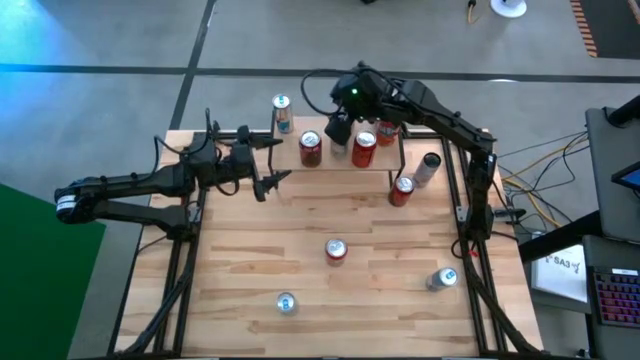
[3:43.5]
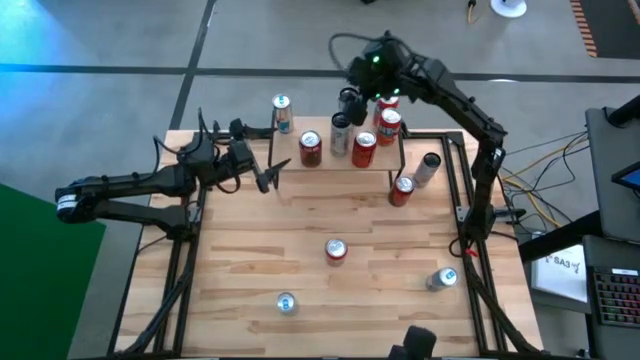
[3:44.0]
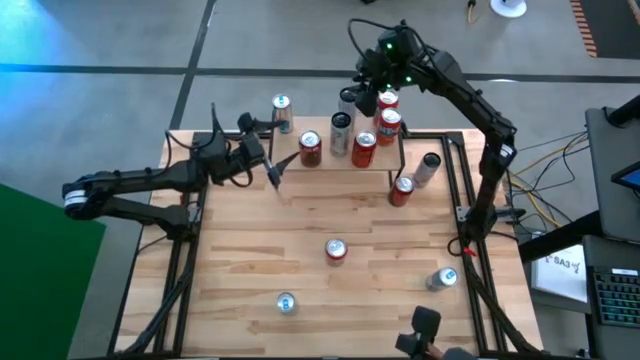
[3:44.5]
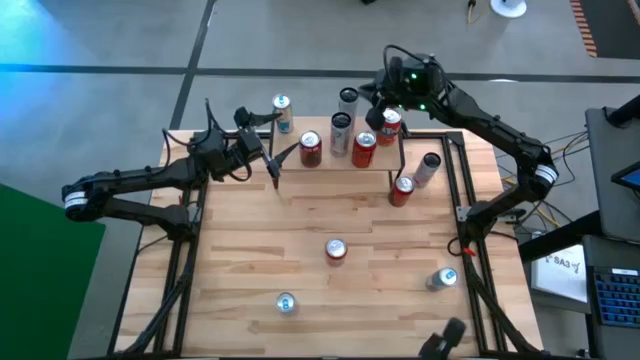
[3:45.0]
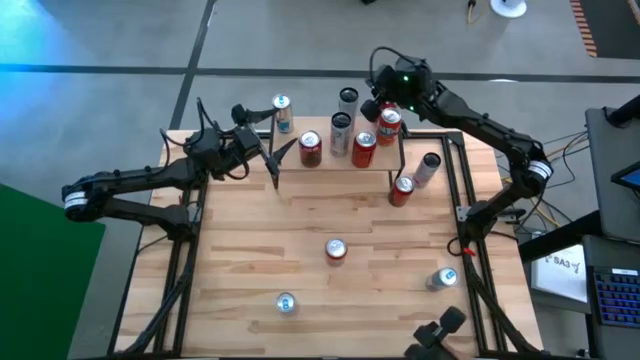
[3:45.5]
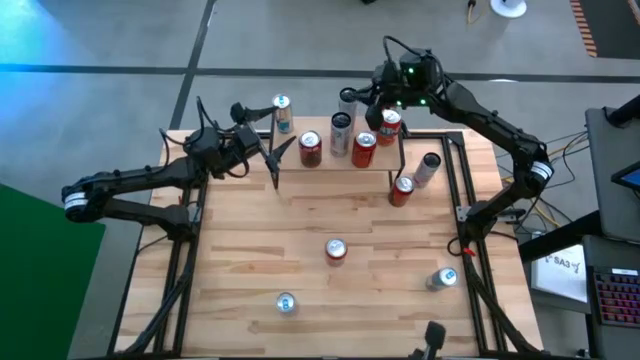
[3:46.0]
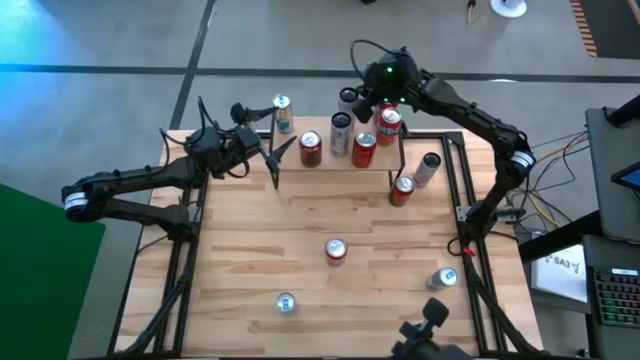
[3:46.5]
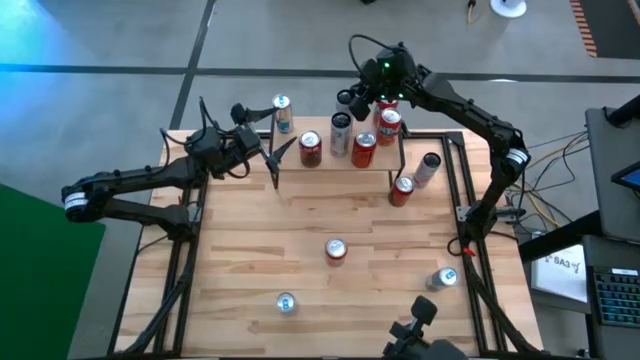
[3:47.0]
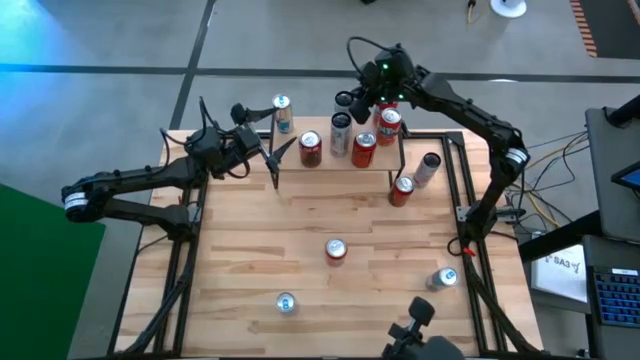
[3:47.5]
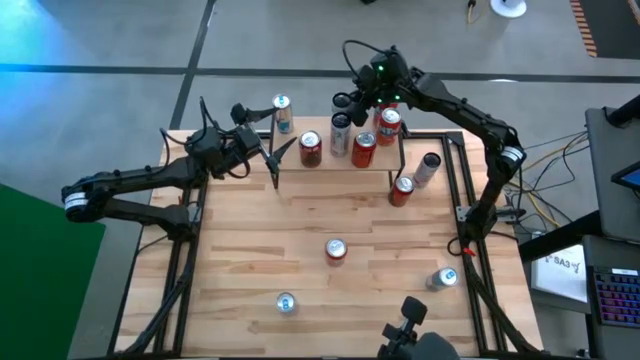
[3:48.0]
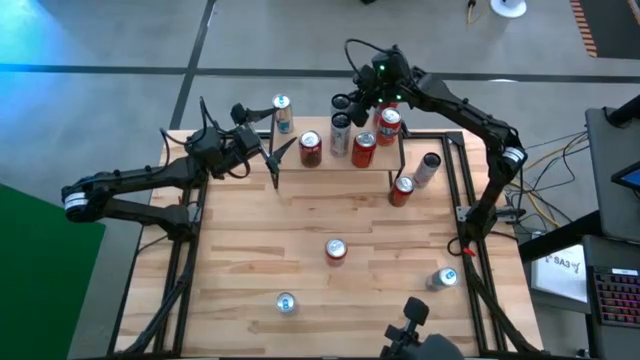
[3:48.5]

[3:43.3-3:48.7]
Task: Place canned beverage on shelf
Adjust the white pink soda can on the shelf

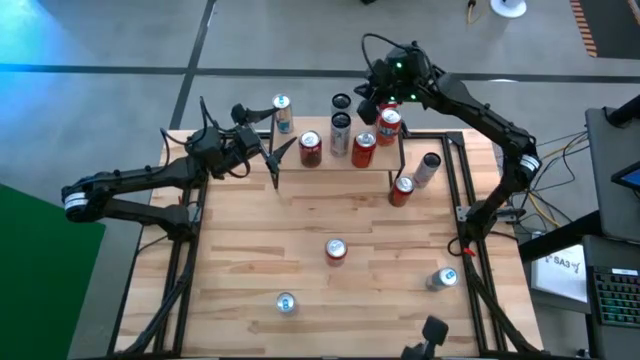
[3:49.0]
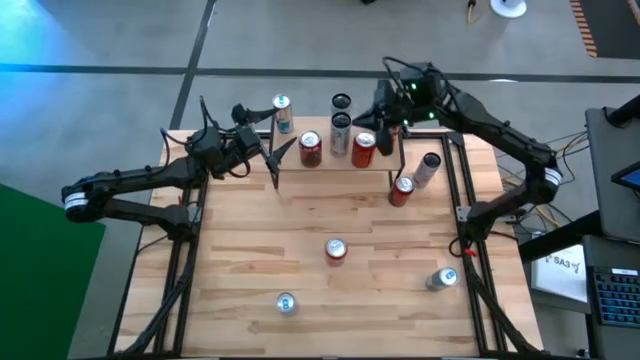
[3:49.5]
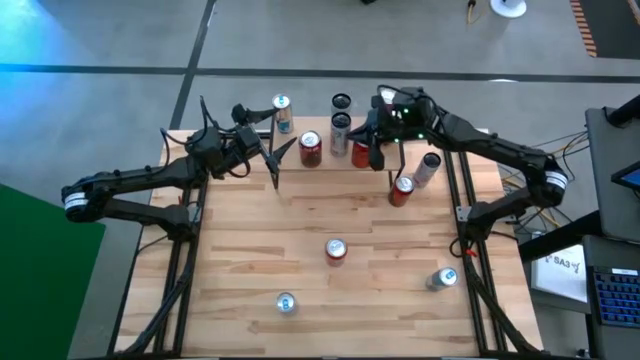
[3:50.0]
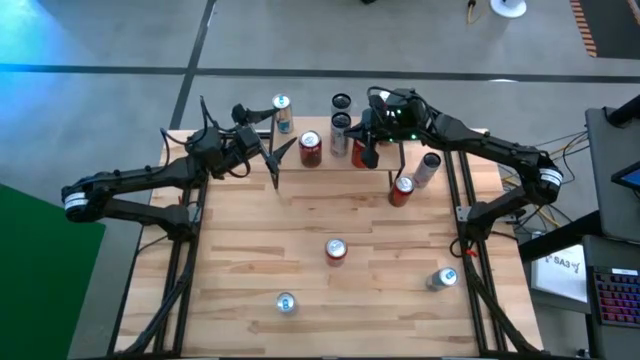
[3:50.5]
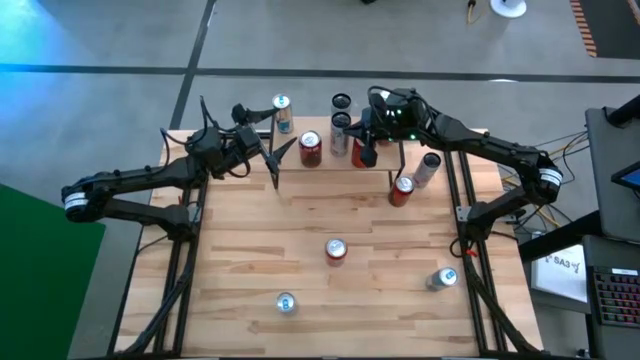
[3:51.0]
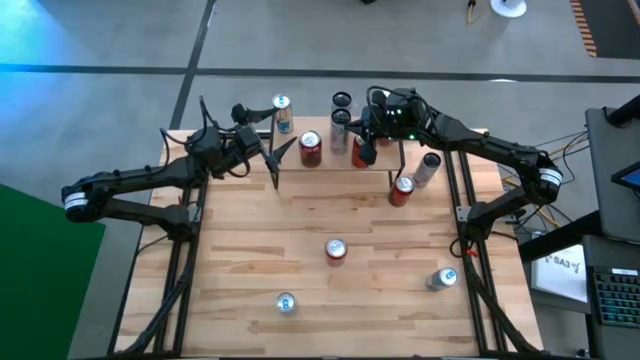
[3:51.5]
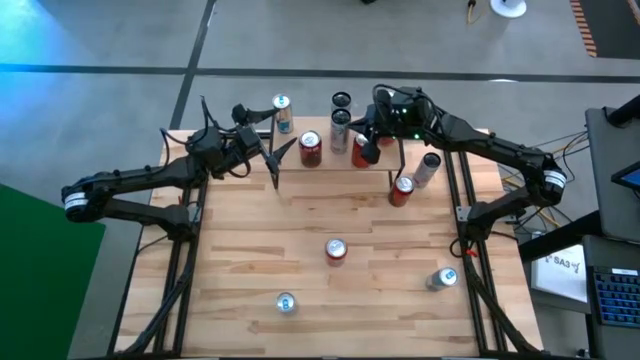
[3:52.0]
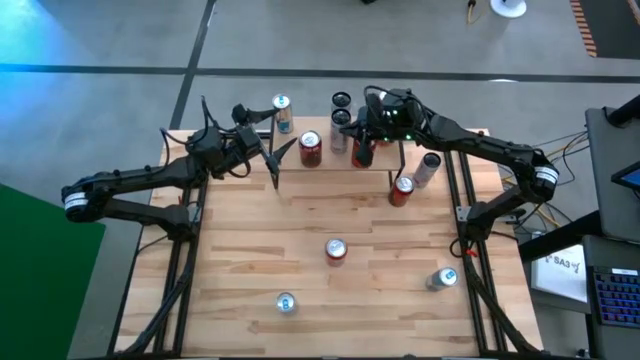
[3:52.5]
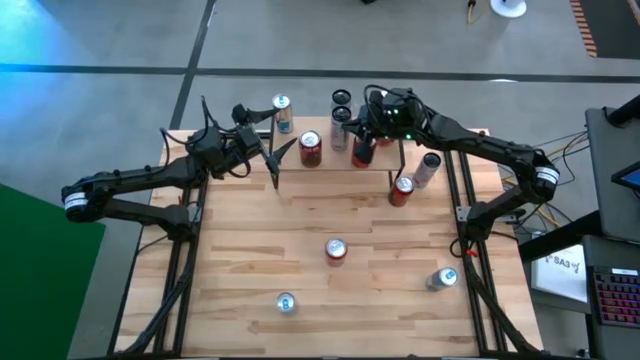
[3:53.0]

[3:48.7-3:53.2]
Adjust the white pink soda can on the shelf

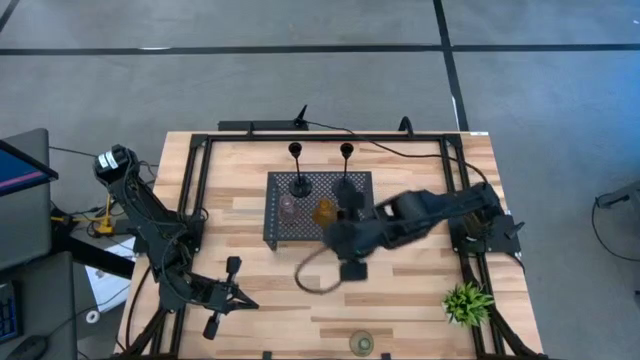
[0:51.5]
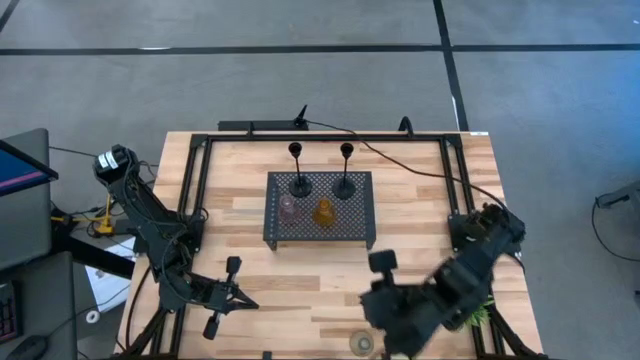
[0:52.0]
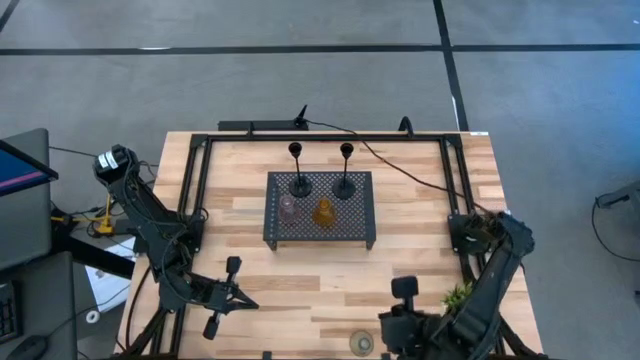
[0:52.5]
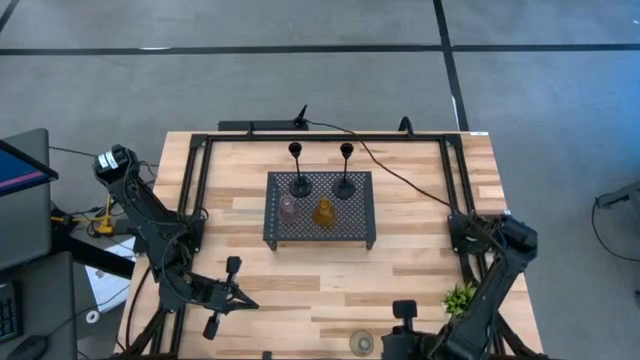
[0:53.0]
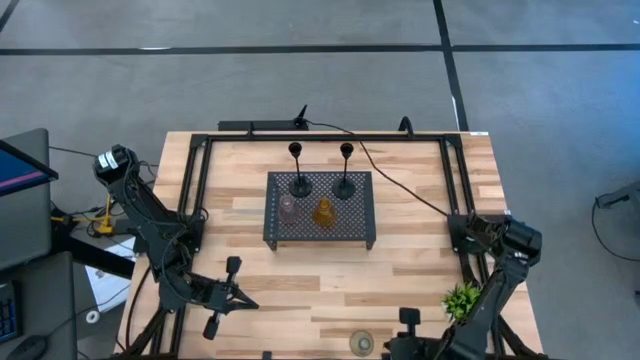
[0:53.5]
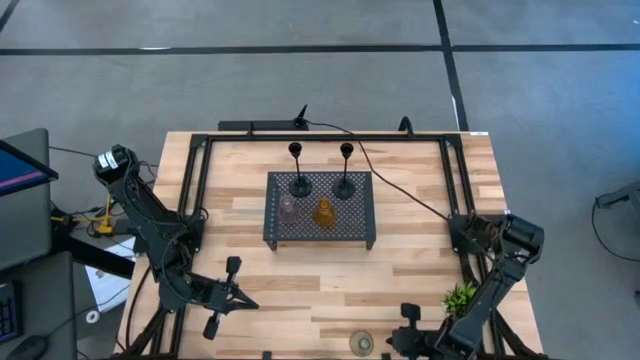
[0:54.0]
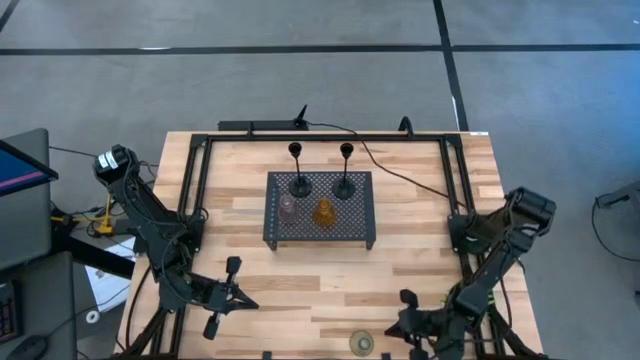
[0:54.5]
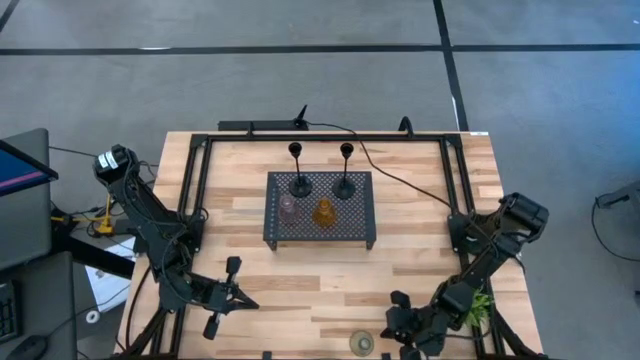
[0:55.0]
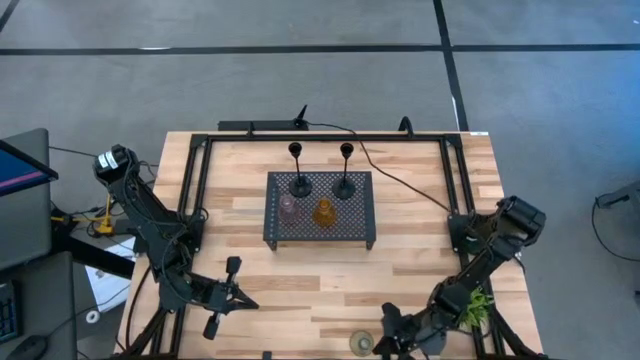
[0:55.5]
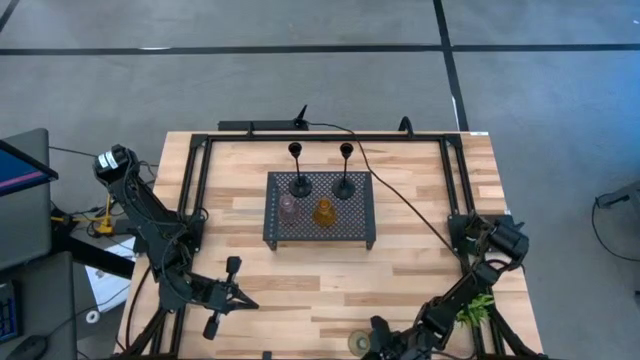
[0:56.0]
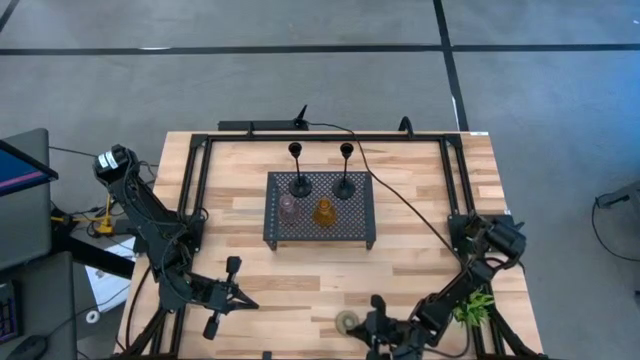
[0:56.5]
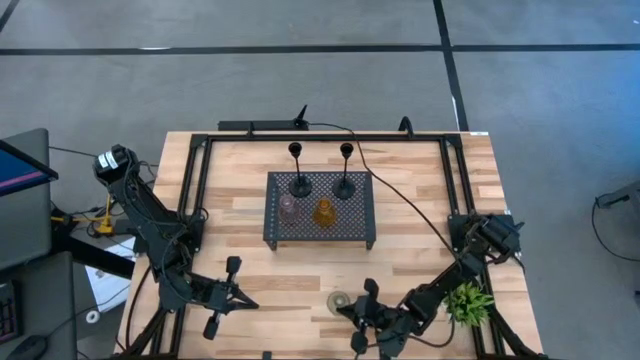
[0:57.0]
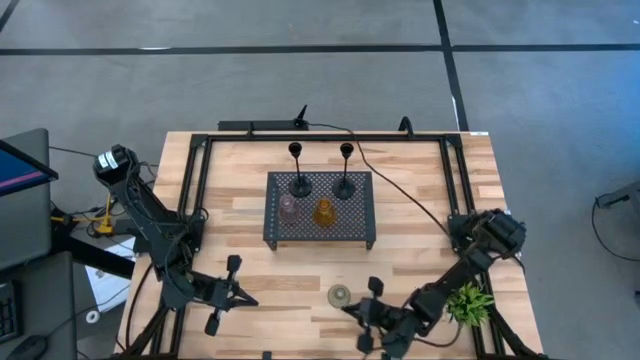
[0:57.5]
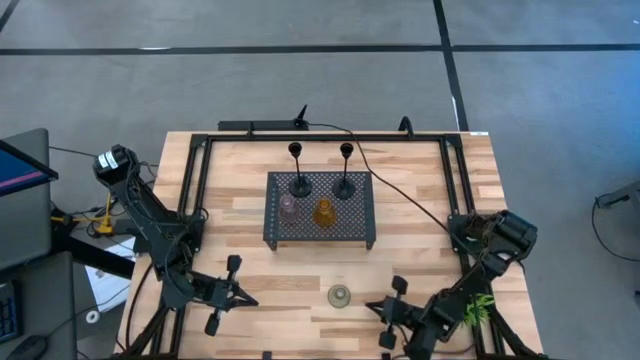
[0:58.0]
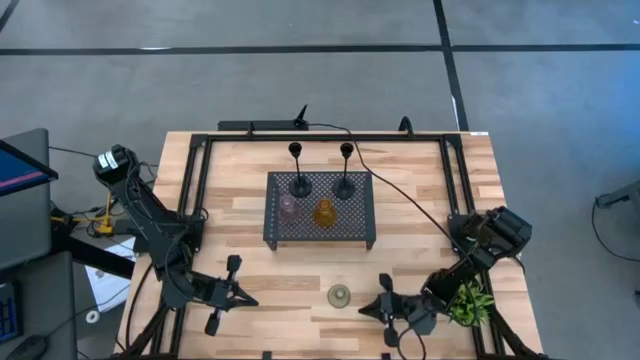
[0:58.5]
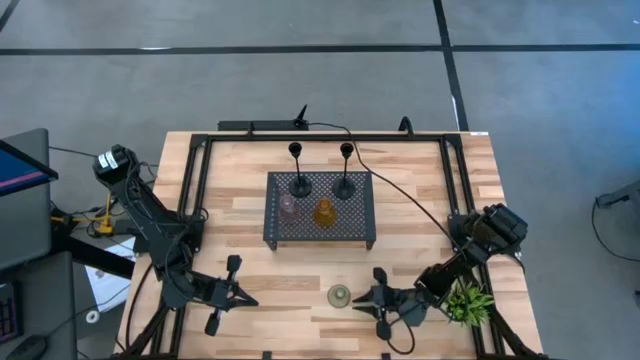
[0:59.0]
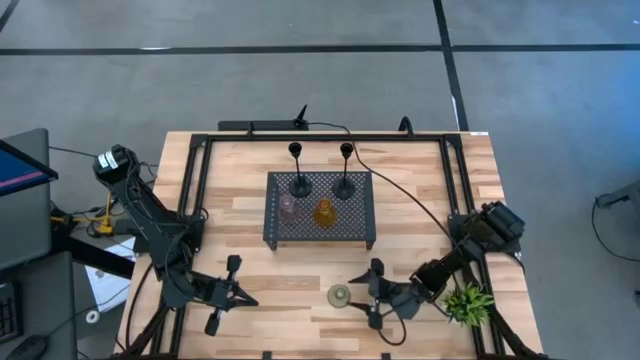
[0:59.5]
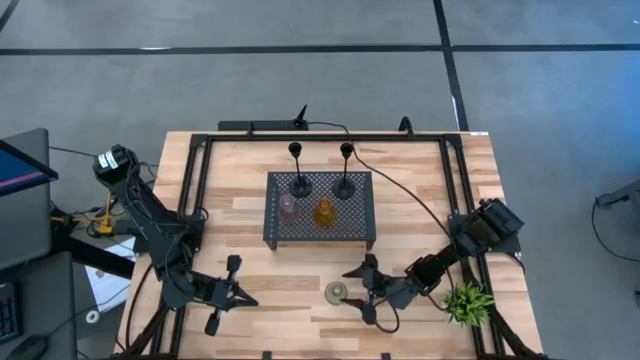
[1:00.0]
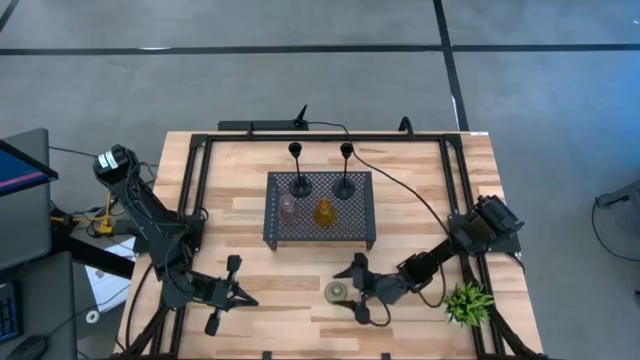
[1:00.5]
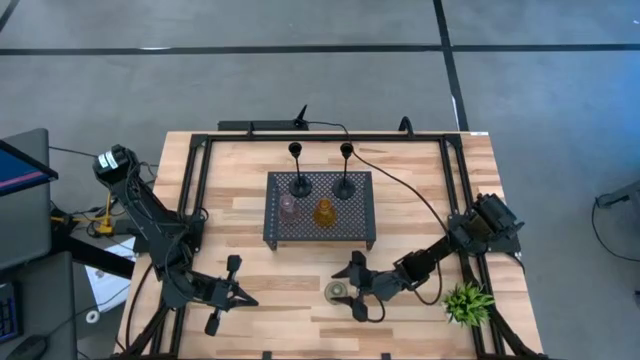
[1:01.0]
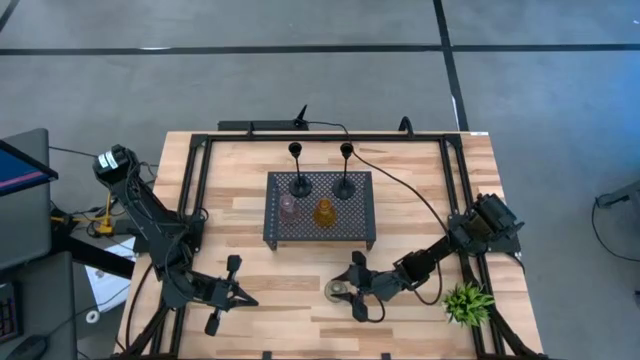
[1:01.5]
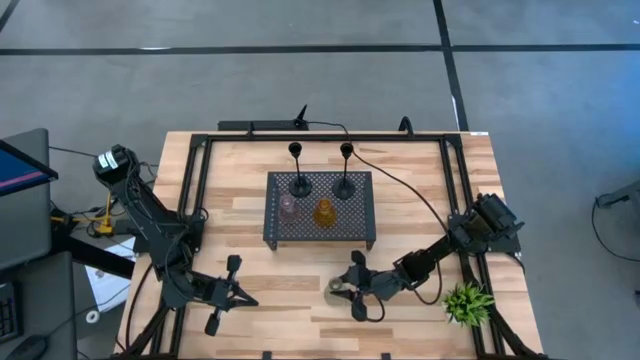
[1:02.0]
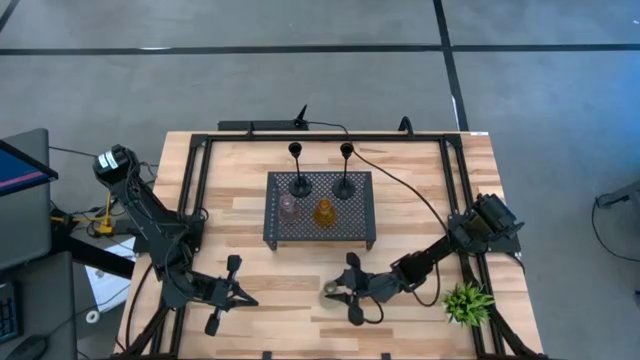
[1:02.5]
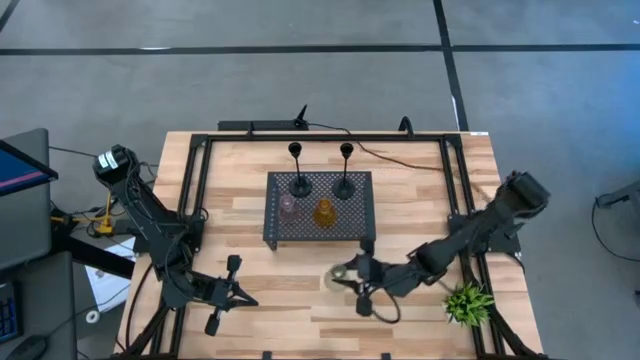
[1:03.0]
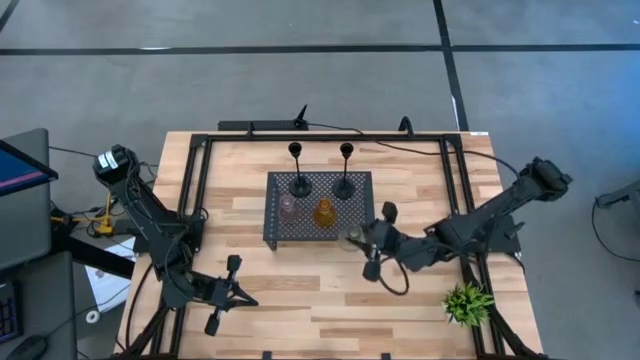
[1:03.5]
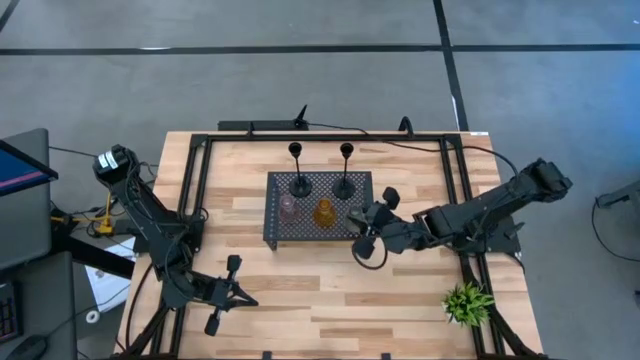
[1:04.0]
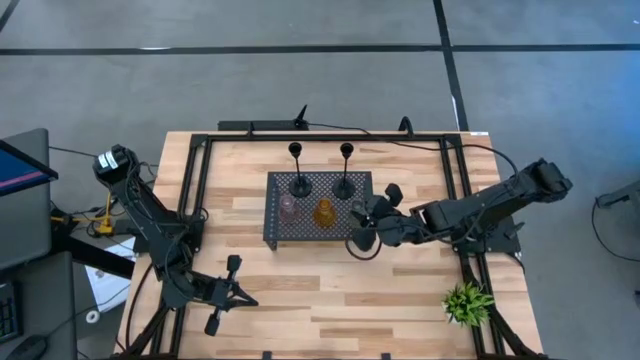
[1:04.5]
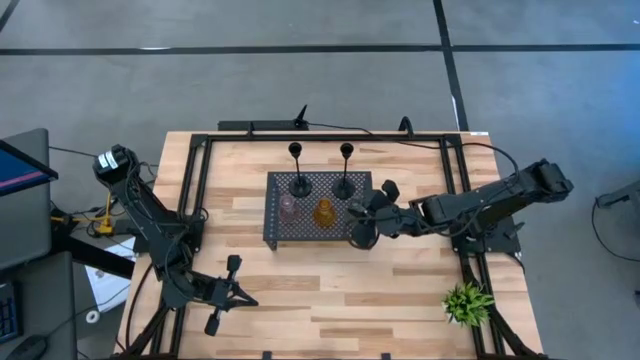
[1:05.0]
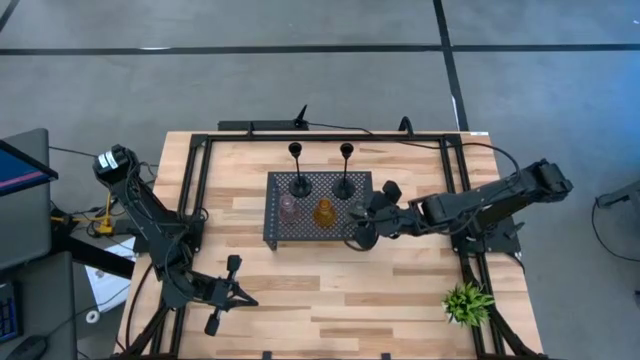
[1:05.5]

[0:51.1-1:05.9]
Task: Pick & Place candle stick holders
Align the green glass candle holder with the orange glass candle holder on the shelf
